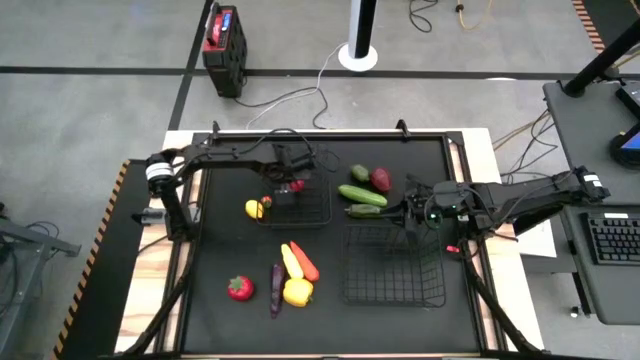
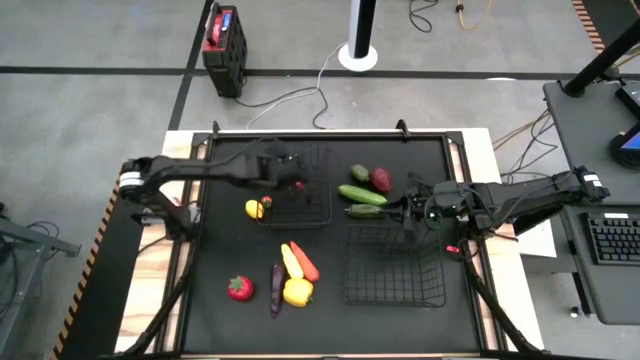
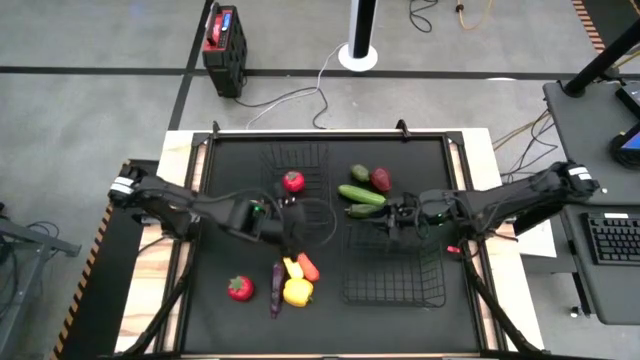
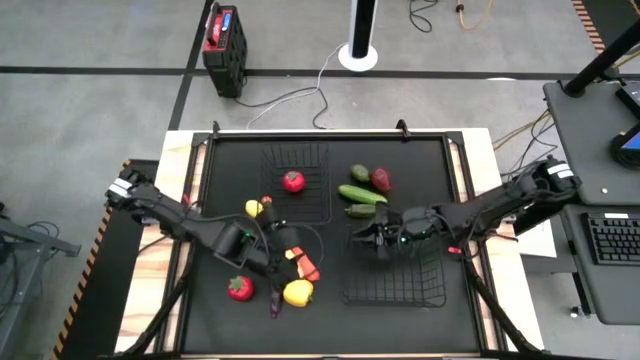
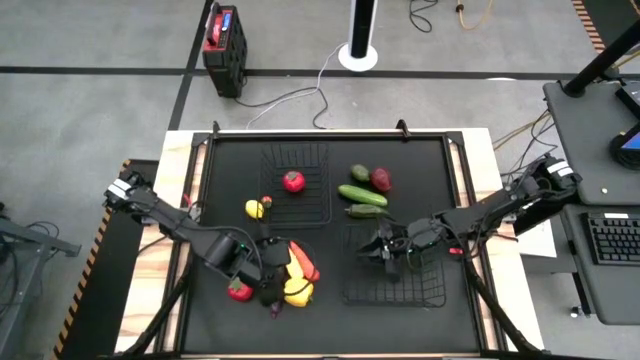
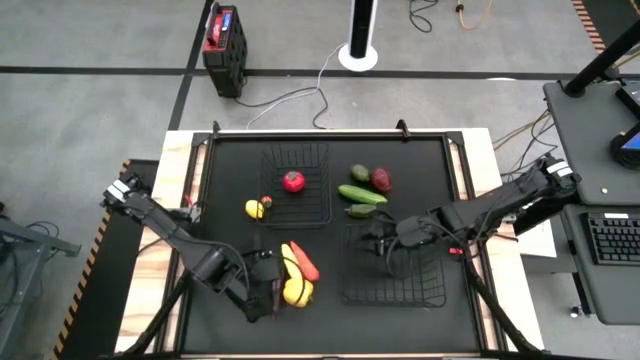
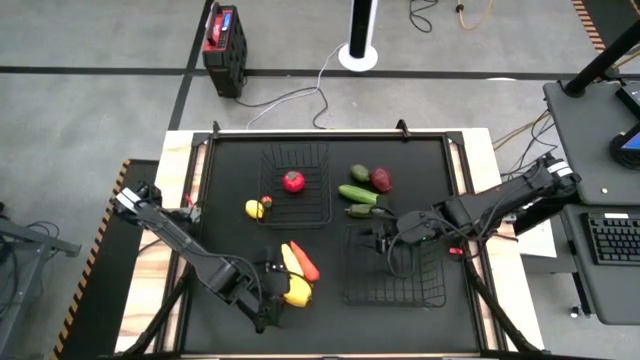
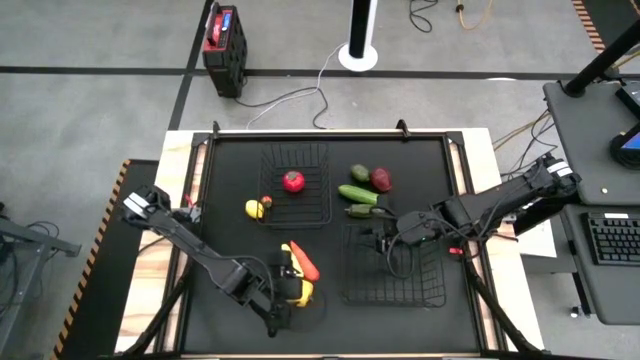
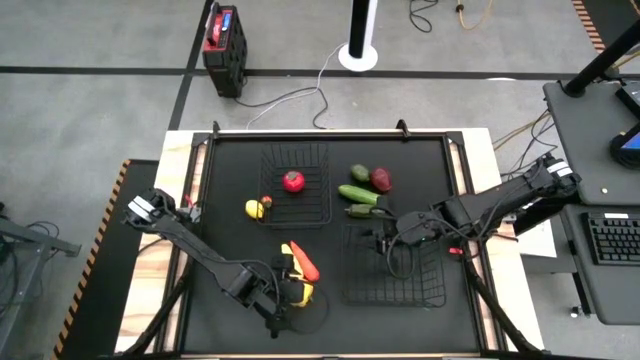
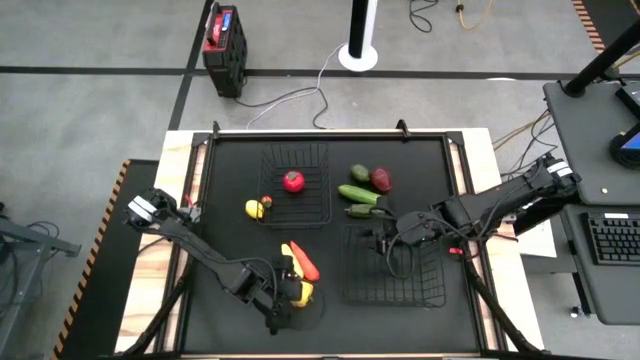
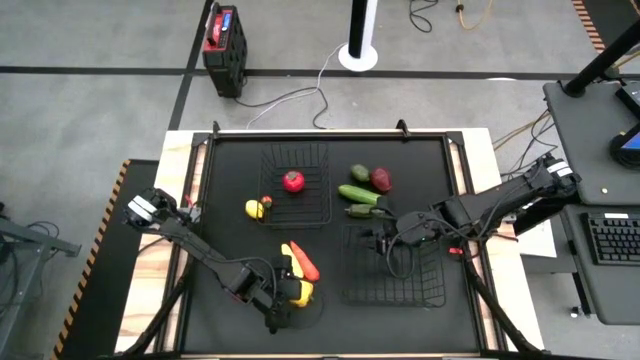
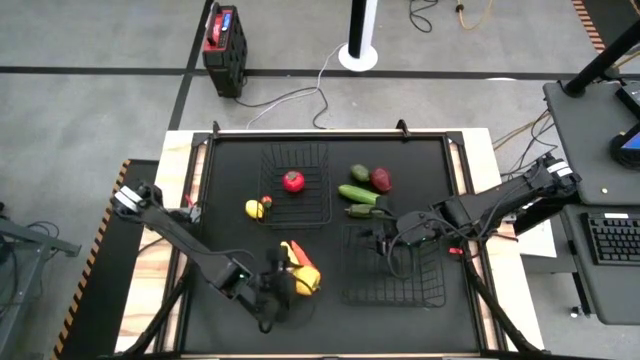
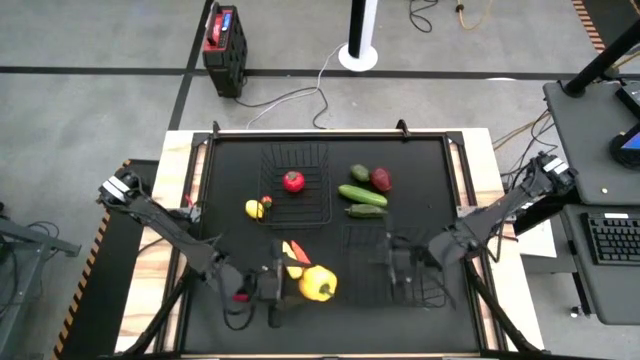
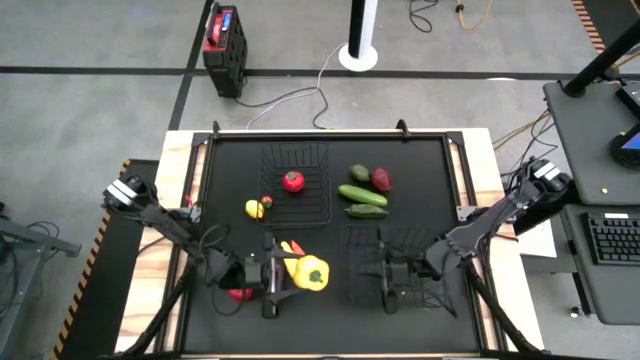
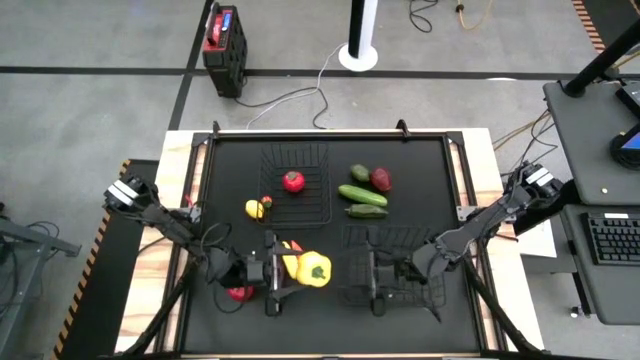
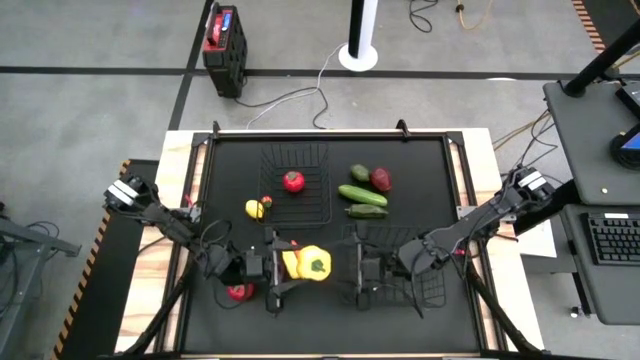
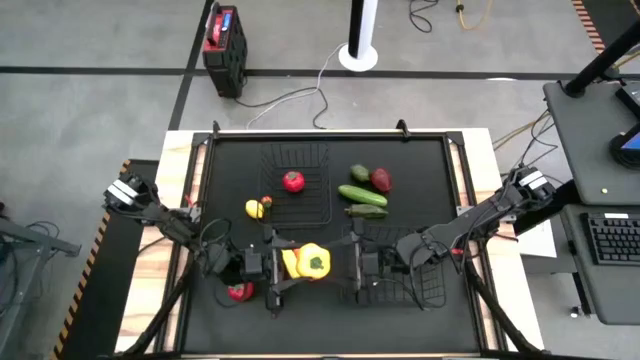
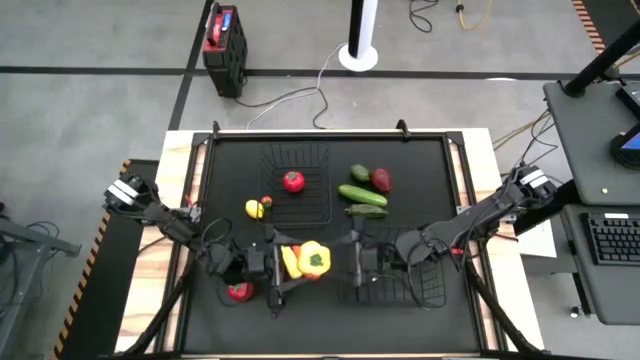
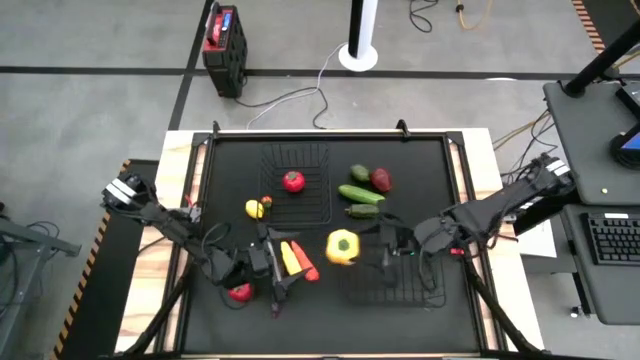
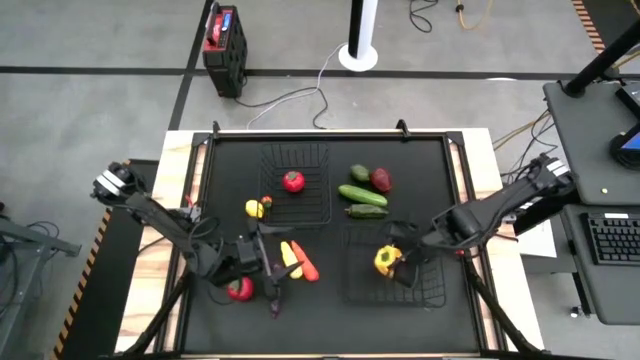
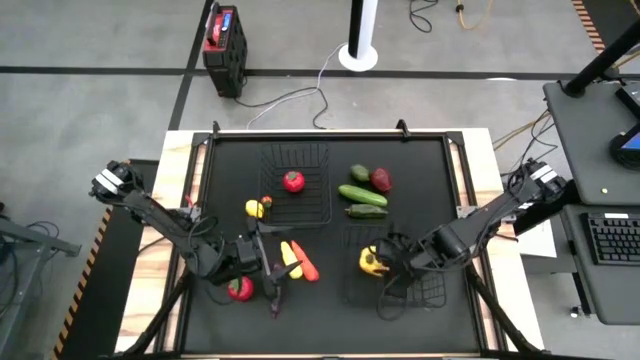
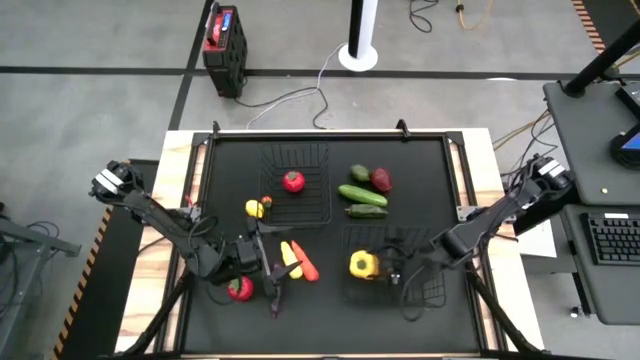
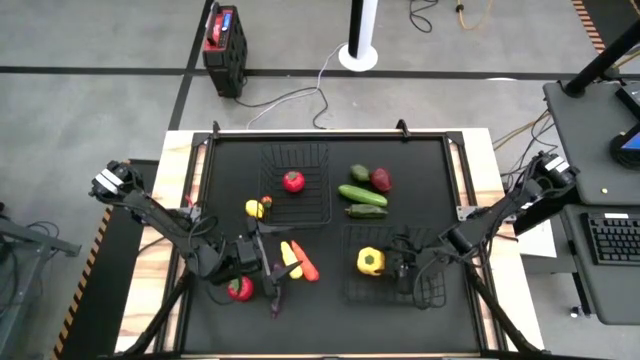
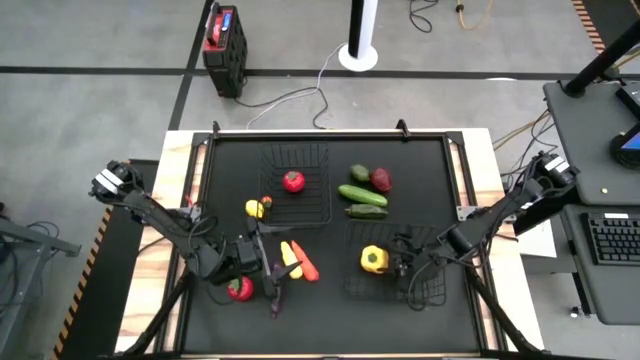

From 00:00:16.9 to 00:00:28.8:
Task: Sort produce into baskets
Put the yellow bell pepper into the bottom black wire basket

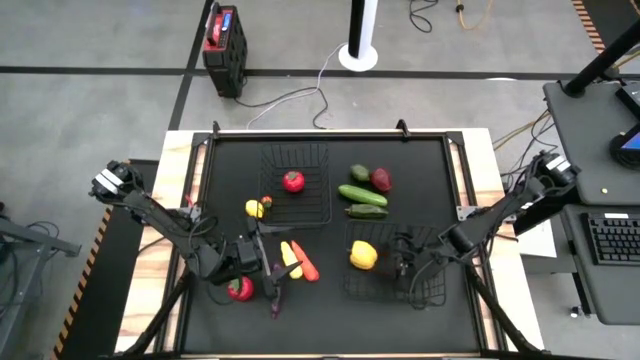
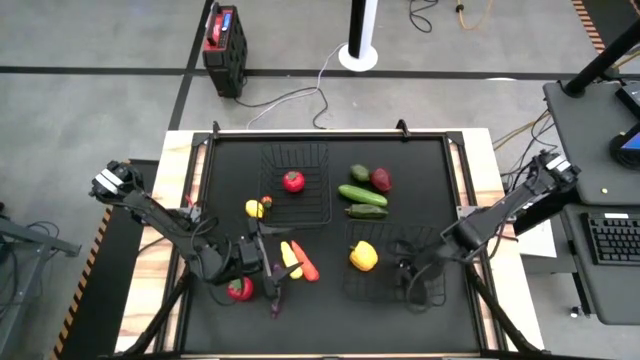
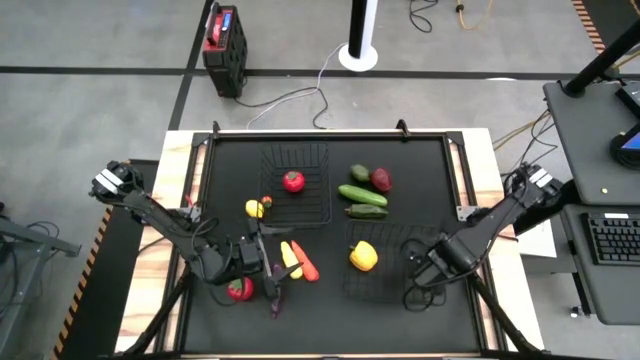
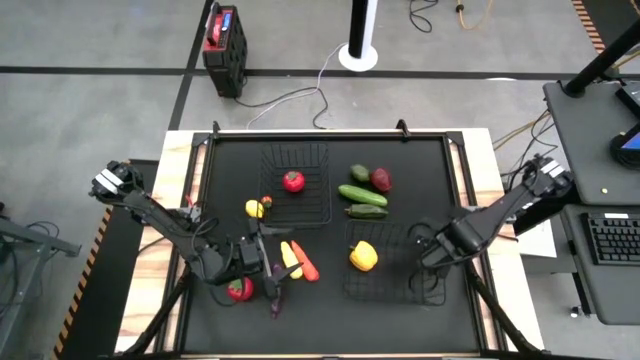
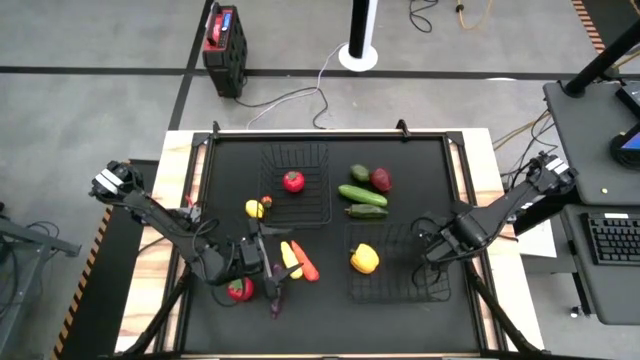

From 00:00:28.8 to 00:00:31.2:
Adjust the bottom black wire basket

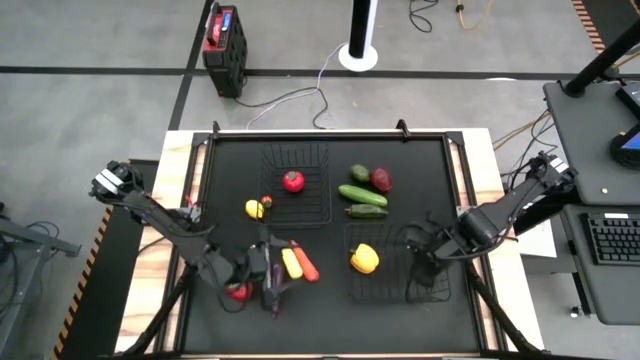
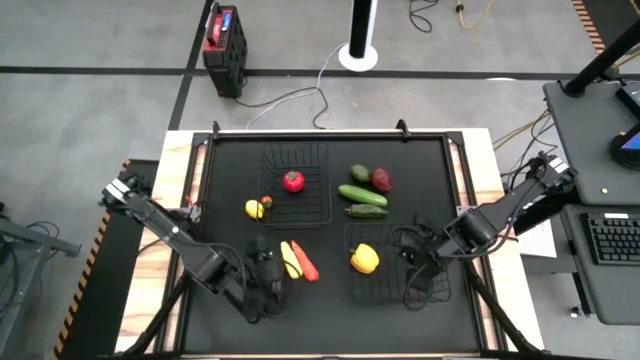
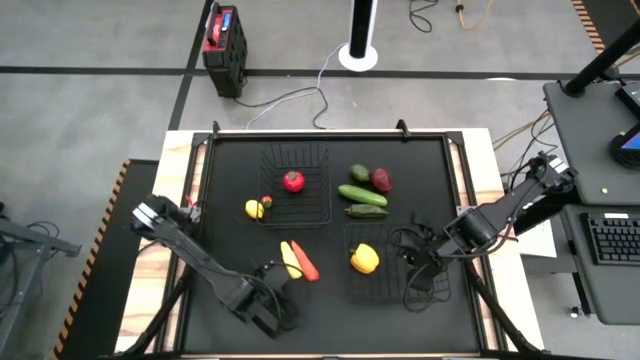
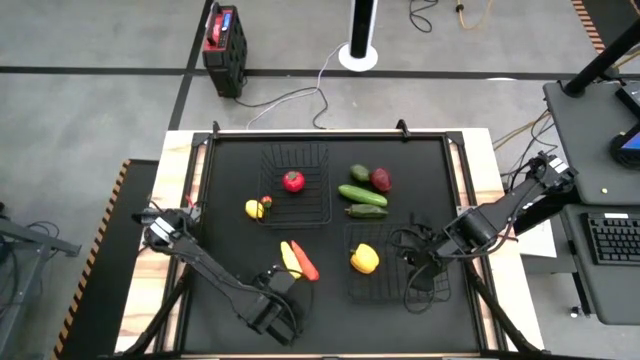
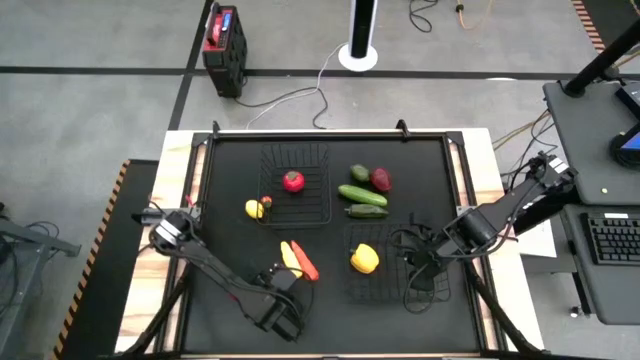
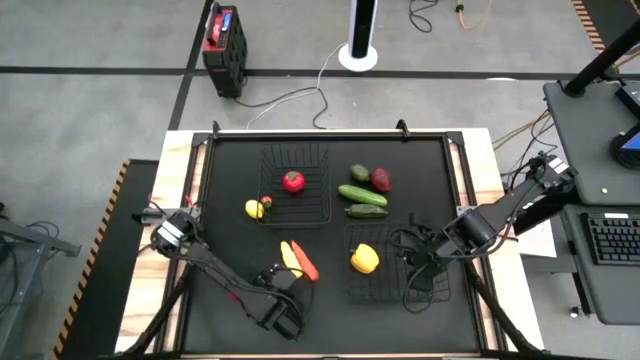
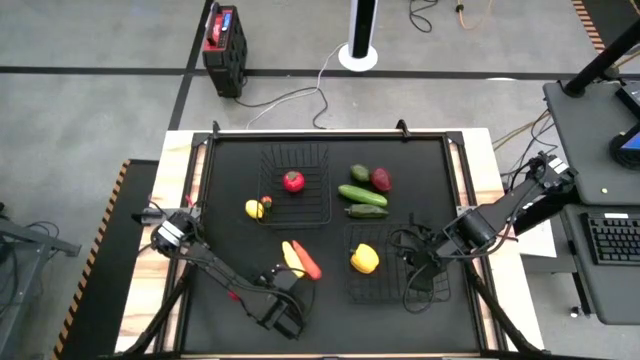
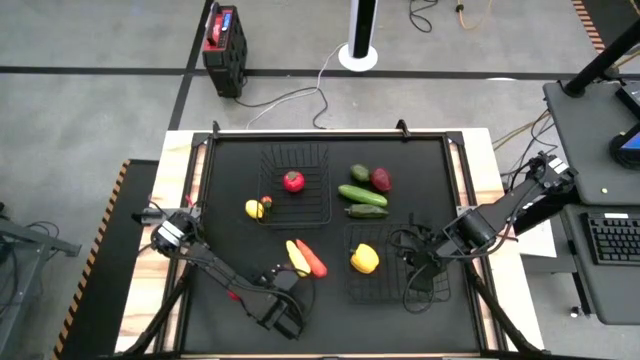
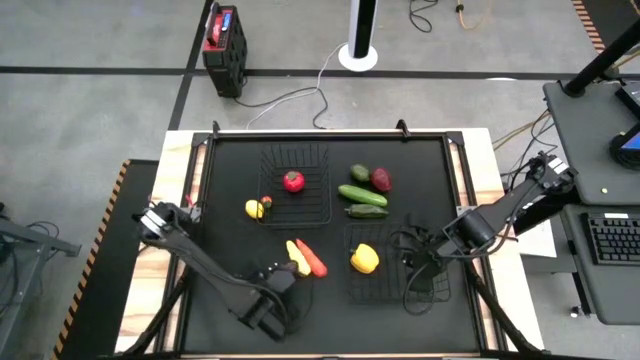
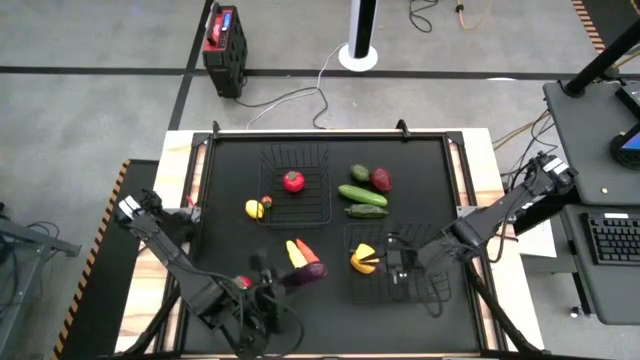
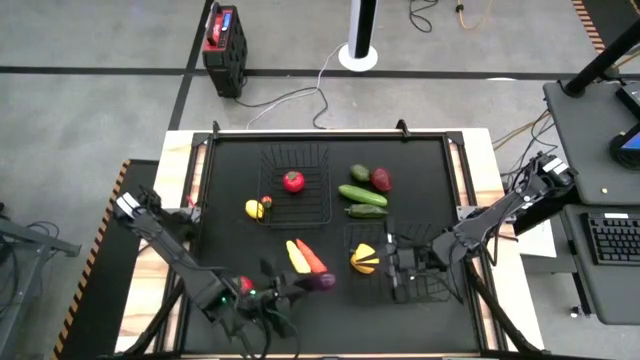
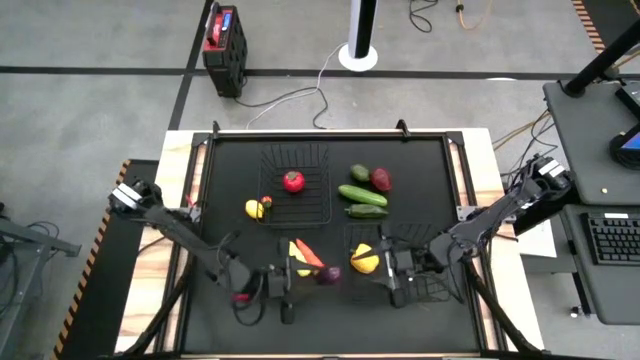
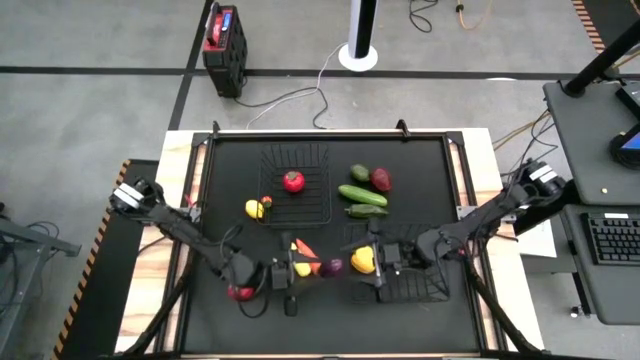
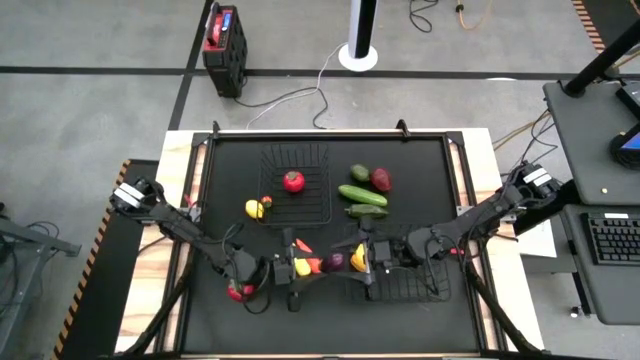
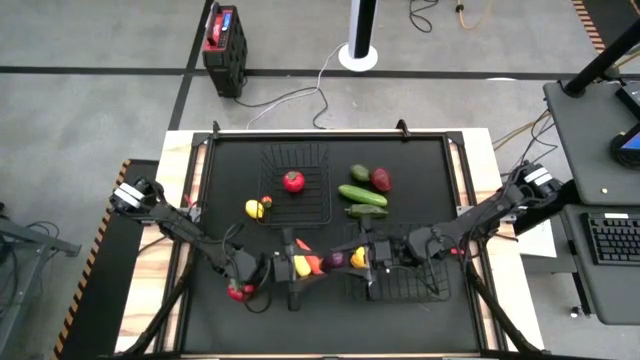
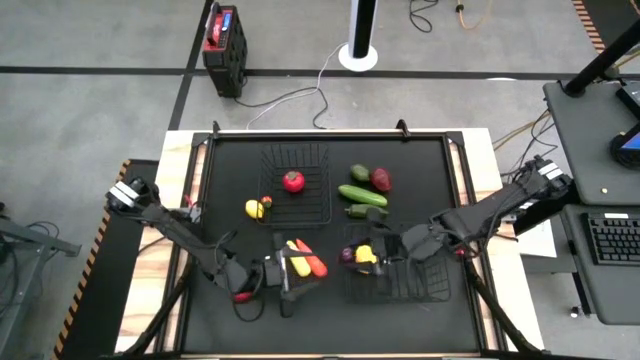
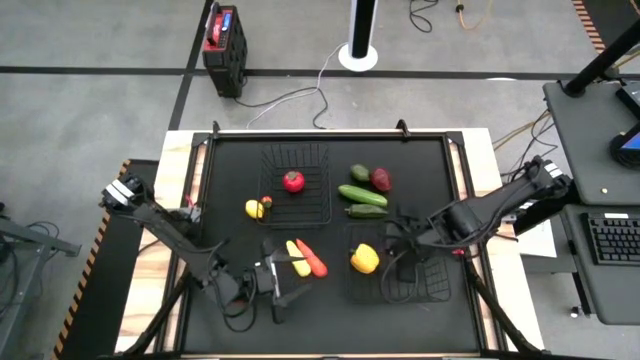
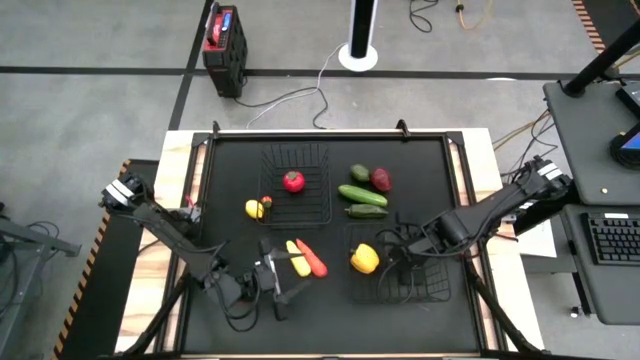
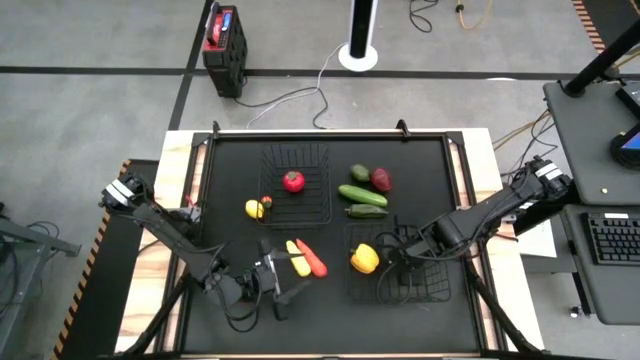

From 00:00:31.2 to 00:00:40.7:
Put the eggplant into the bottom black wire basket
